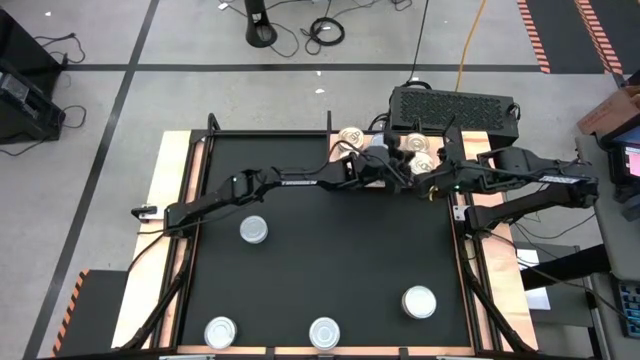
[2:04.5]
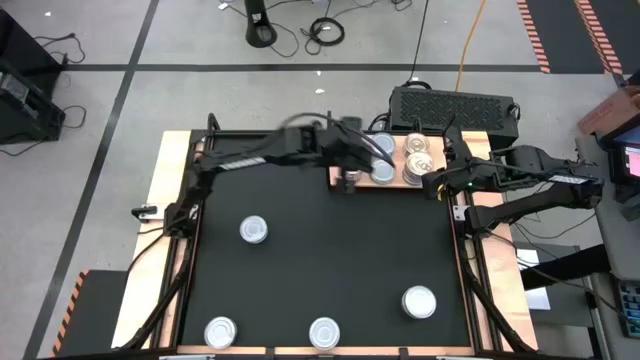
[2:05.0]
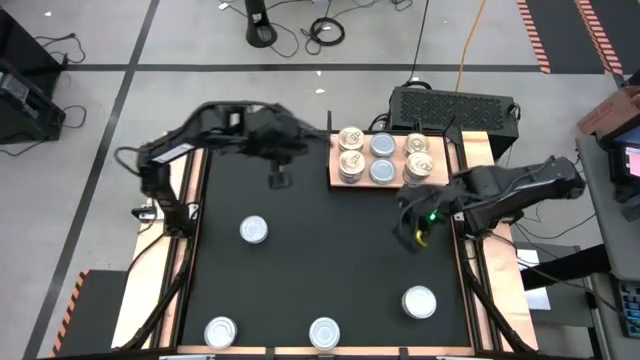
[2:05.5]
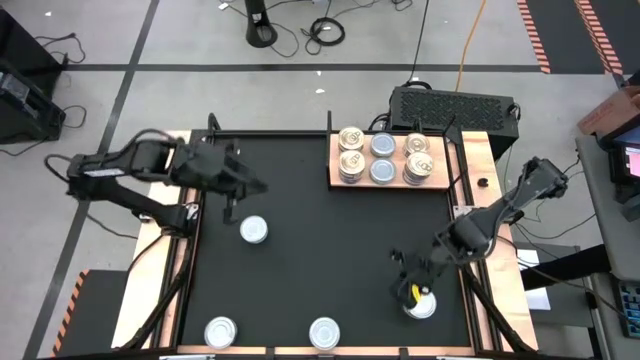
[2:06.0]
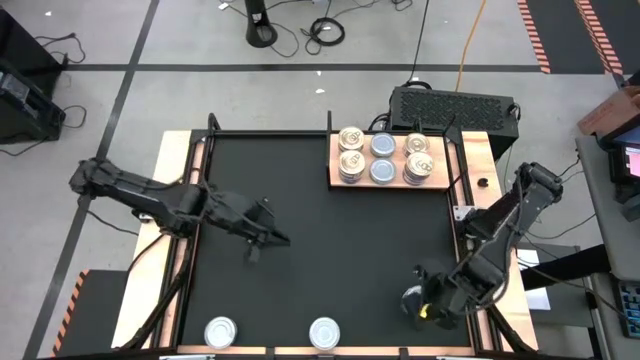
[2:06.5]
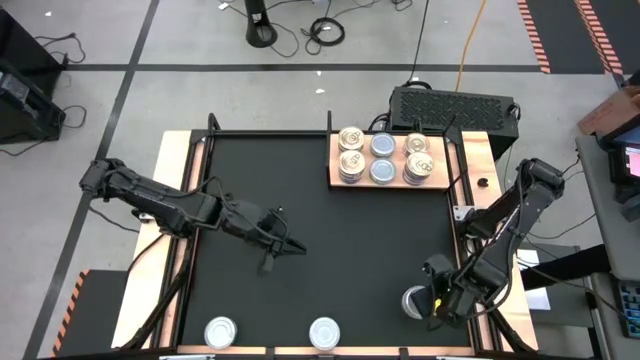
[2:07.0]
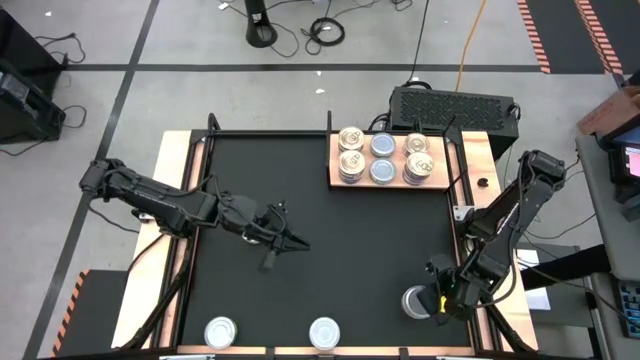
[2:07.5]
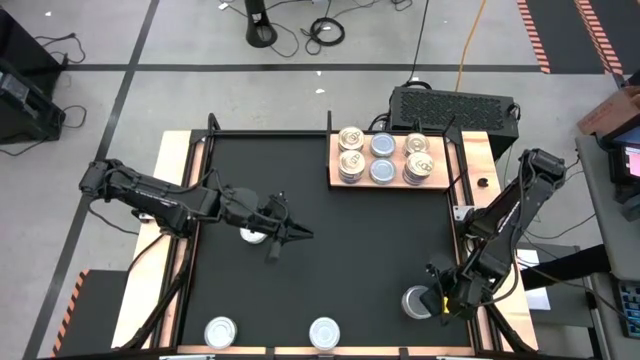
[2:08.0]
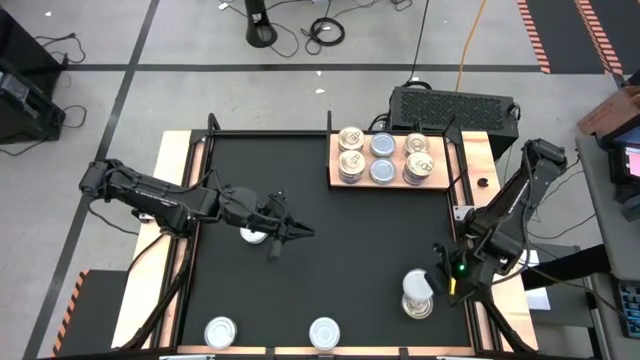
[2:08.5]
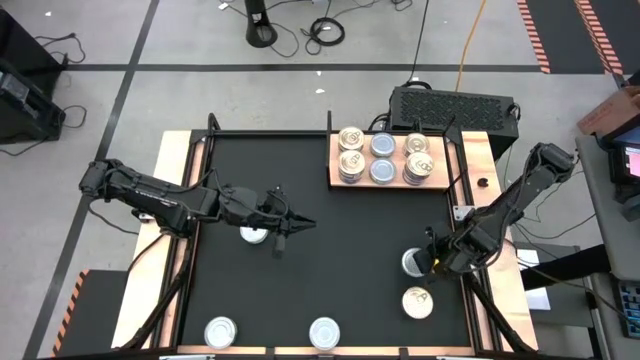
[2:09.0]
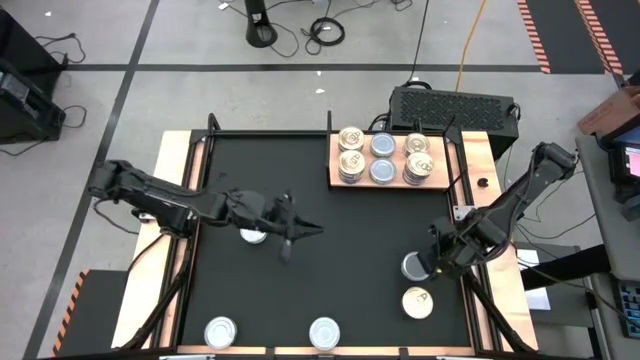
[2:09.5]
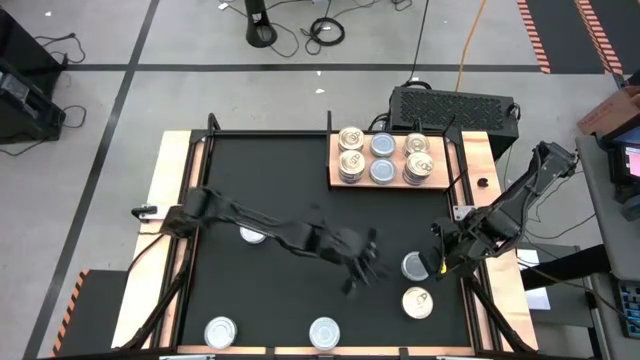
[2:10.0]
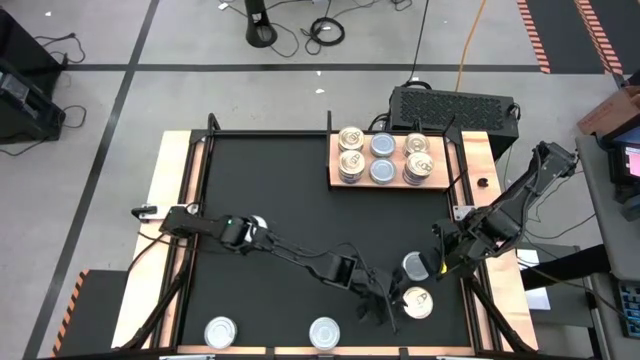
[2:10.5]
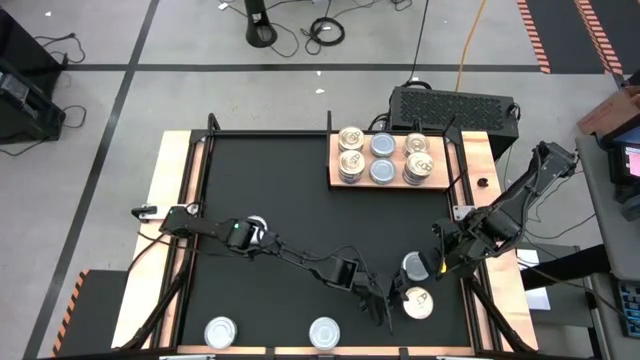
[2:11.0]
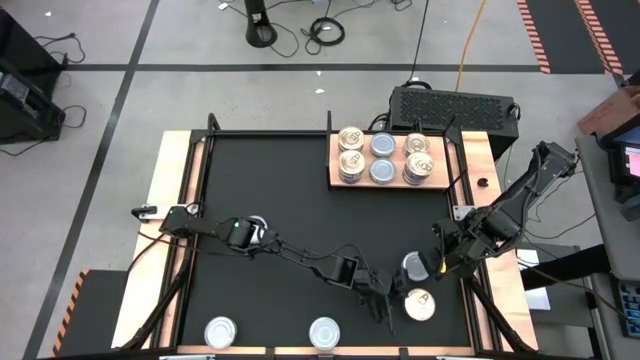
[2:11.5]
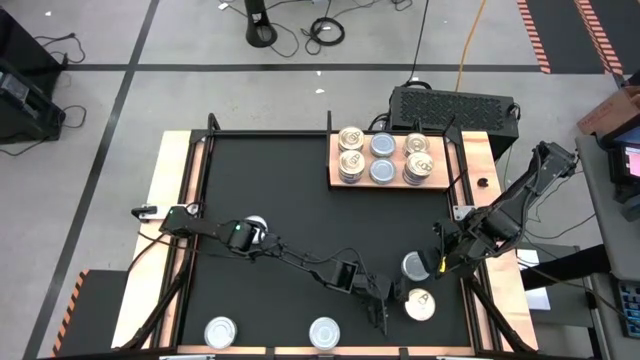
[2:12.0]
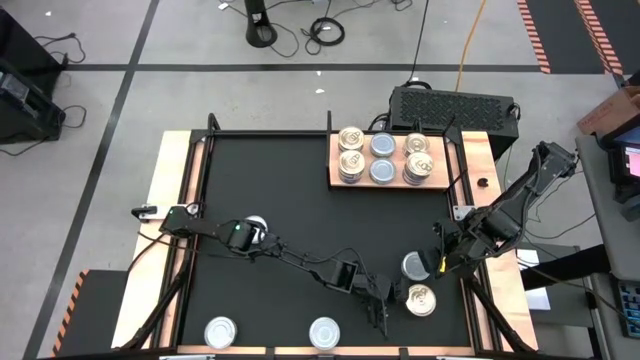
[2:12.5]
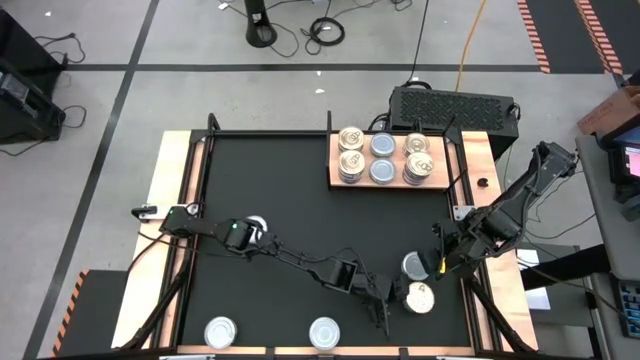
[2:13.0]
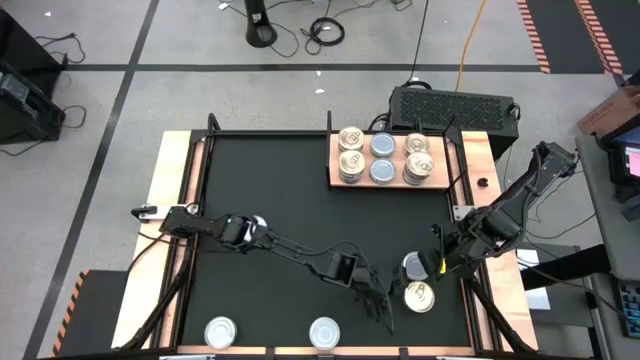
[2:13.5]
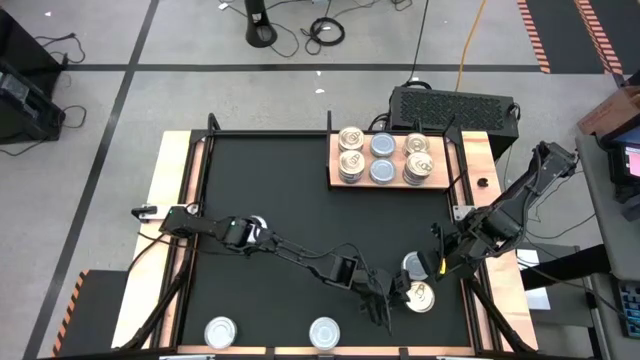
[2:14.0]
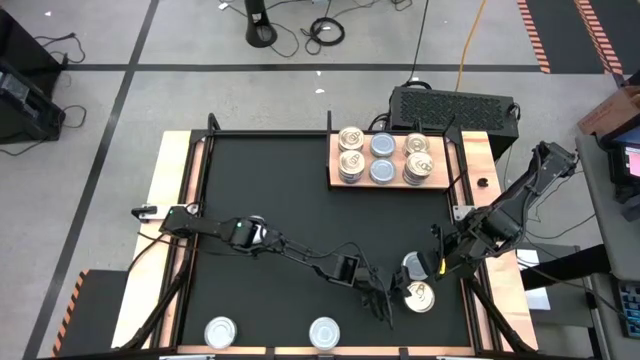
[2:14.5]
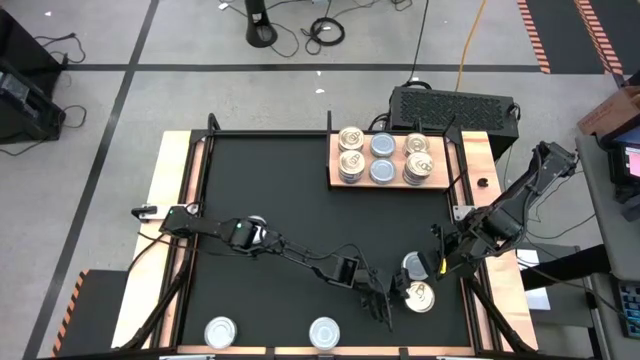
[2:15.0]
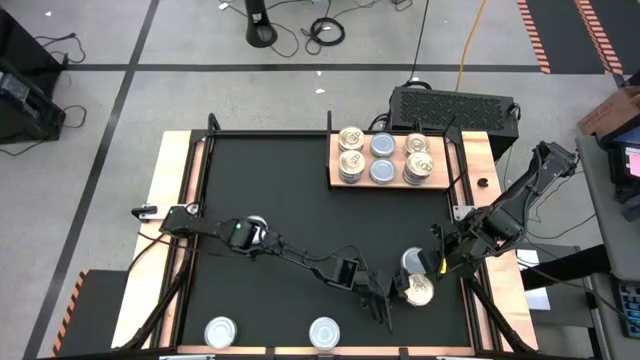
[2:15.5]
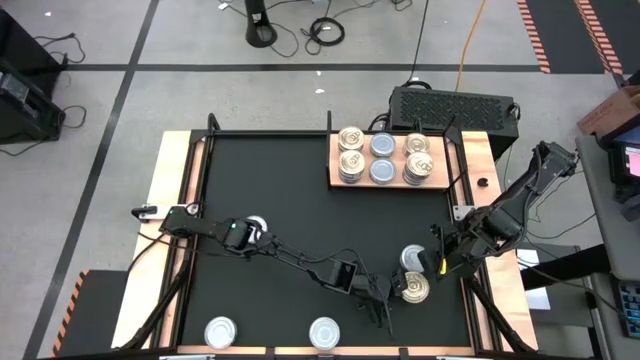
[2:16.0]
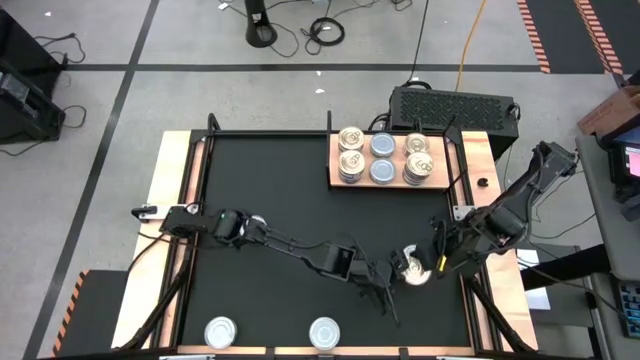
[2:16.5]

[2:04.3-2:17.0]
Task: Stack canned seafood by type on shelf
Stack the blue pink tuna can on top of the other blue pink tuna can on the shelf

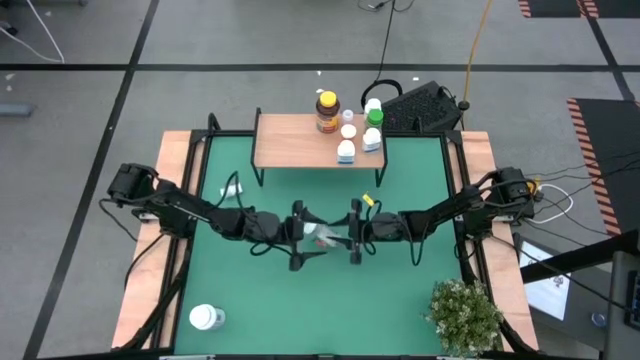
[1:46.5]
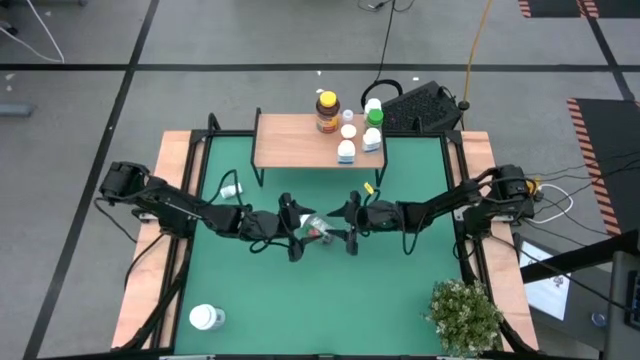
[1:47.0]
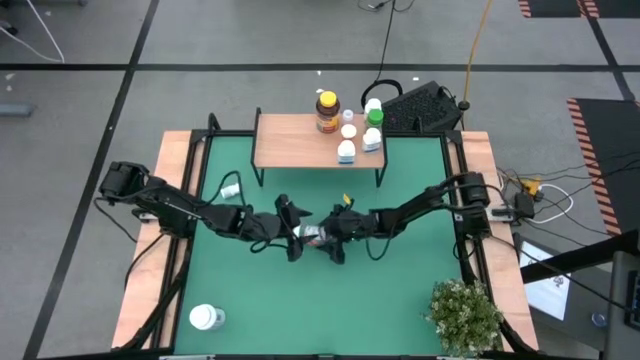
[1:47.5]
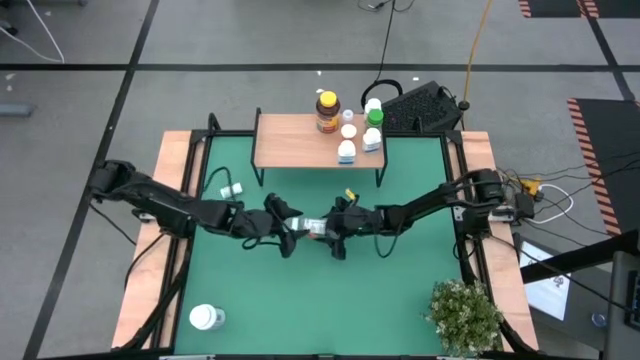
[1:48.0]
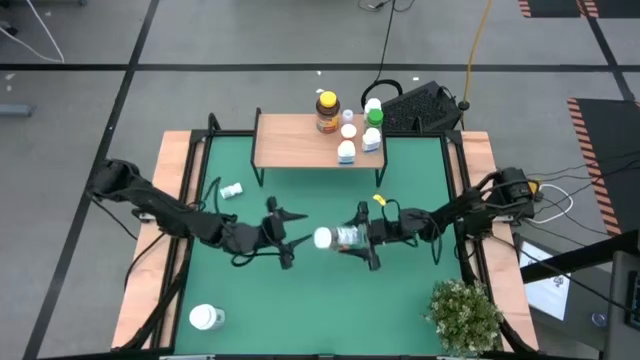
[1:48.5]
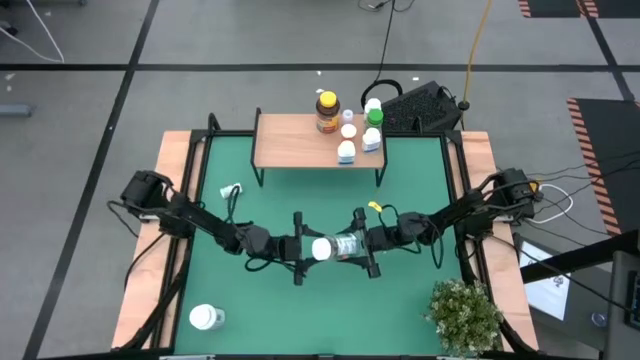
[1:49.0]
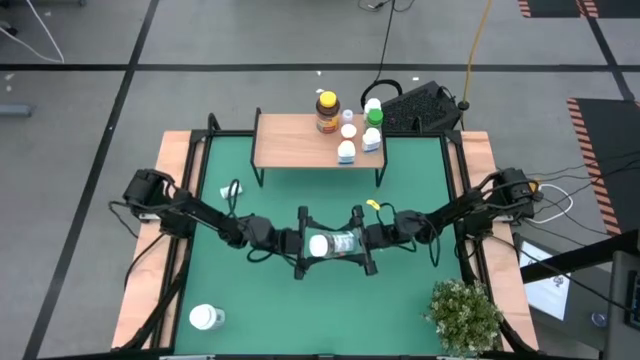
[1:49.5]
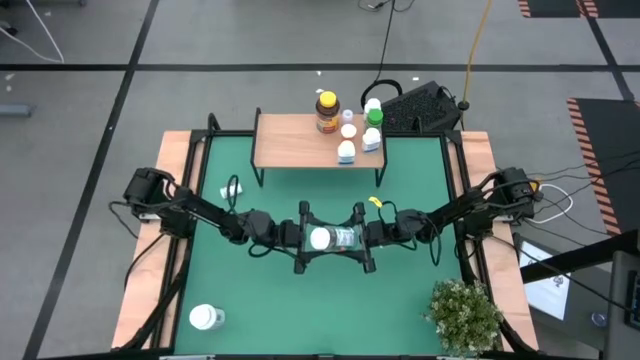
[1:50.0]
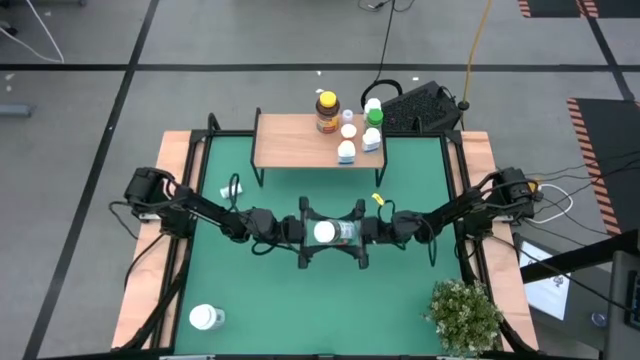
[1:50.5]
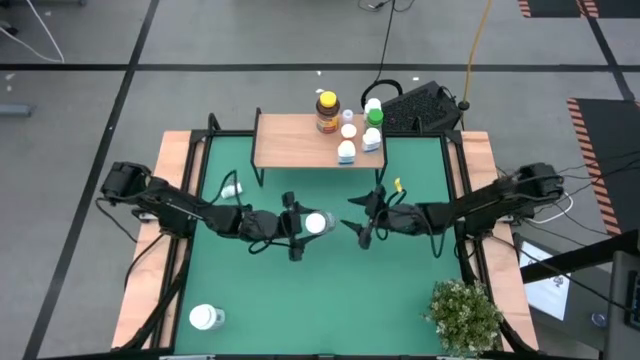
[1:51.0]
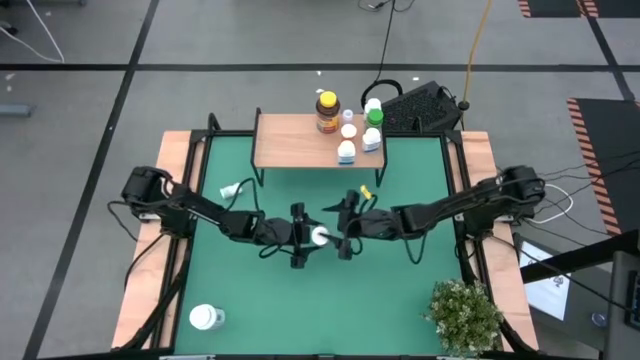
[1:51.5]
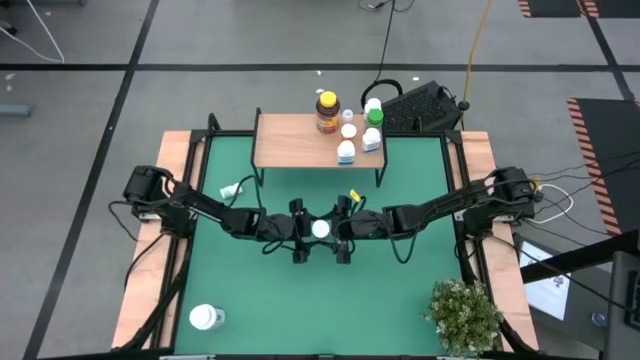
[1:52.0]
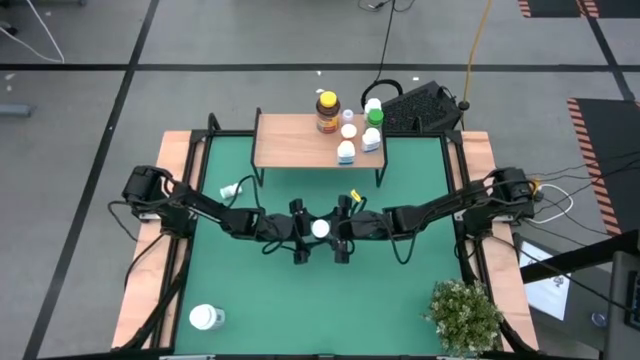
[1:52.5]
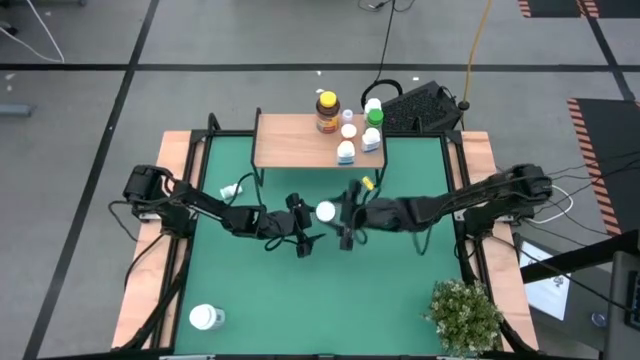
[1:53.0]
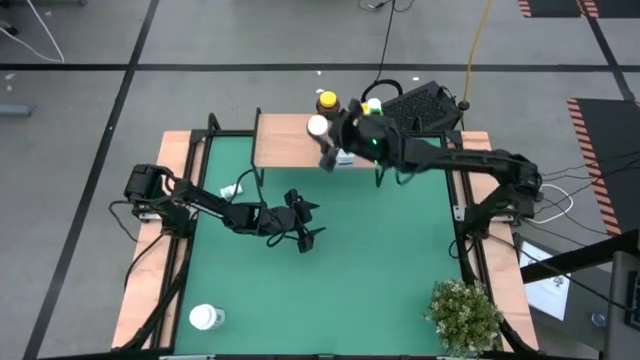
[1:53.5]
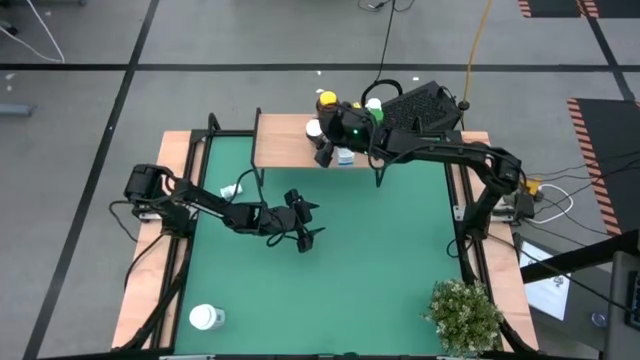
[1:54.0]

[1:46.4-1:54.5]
Task: Pick and place medicine bottles onto shelf by color
Put the green medicine bottle on the shelf
